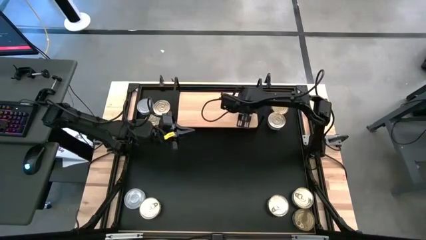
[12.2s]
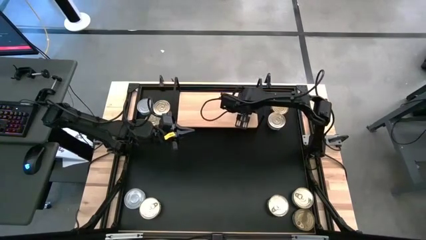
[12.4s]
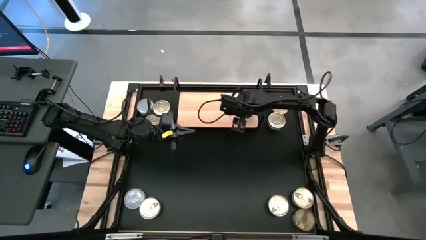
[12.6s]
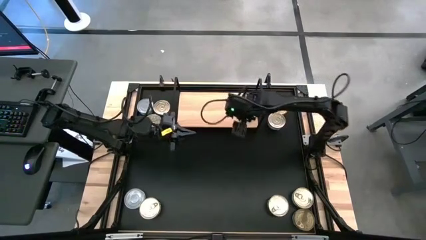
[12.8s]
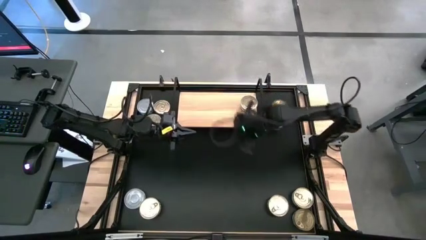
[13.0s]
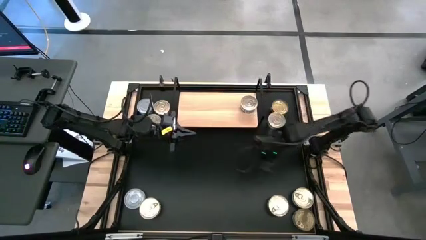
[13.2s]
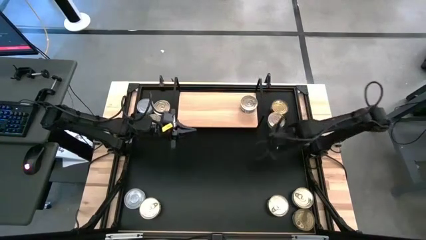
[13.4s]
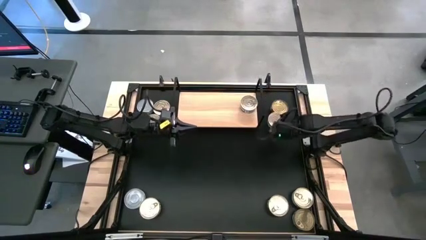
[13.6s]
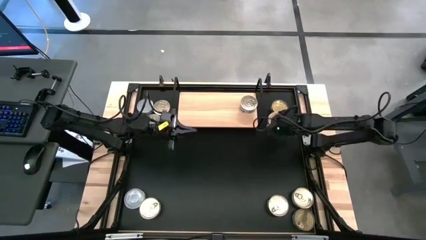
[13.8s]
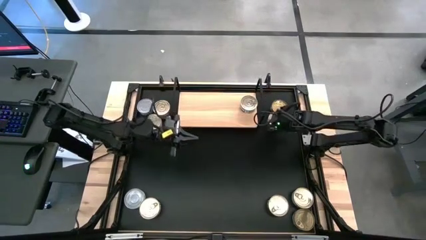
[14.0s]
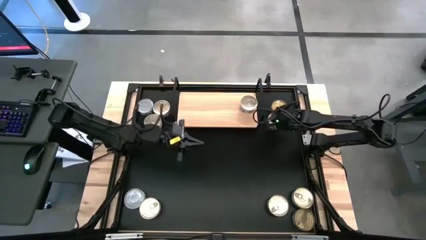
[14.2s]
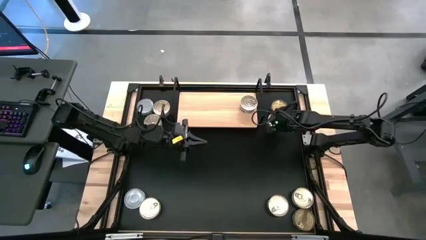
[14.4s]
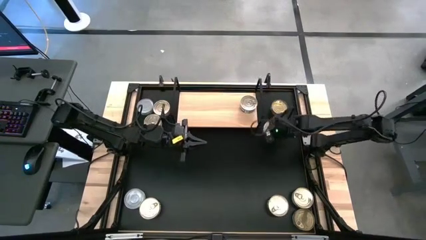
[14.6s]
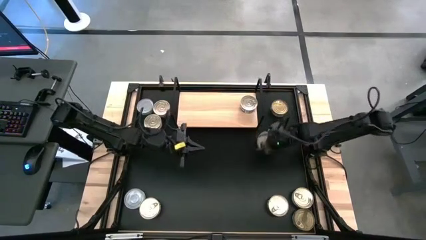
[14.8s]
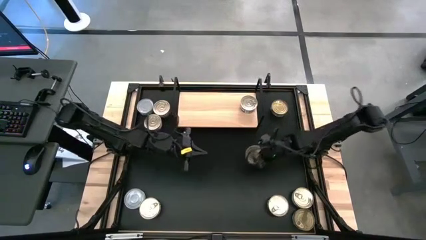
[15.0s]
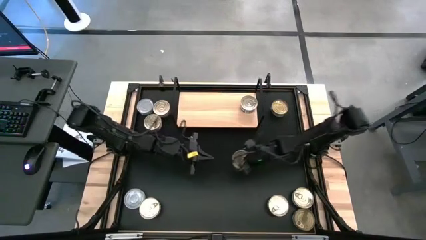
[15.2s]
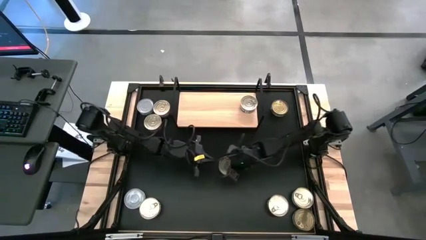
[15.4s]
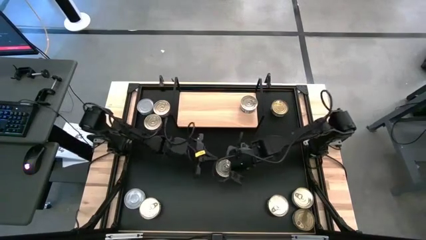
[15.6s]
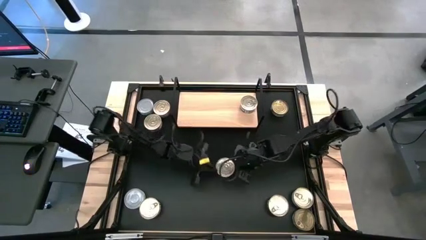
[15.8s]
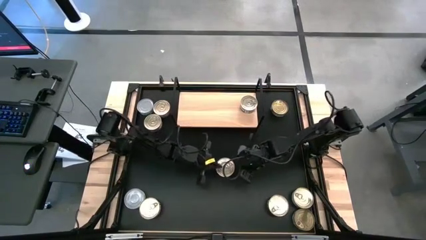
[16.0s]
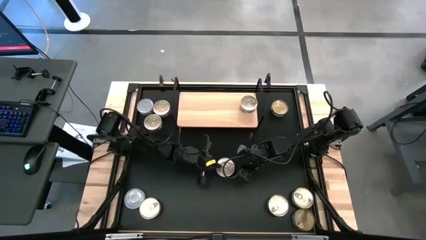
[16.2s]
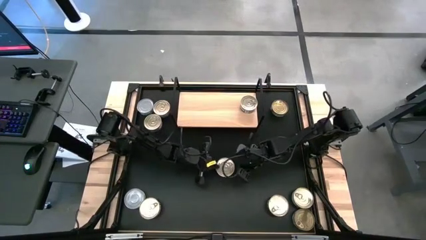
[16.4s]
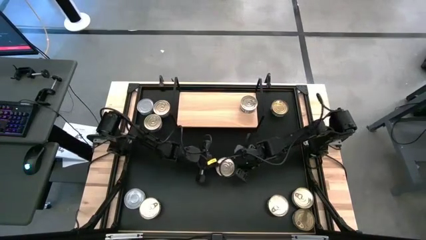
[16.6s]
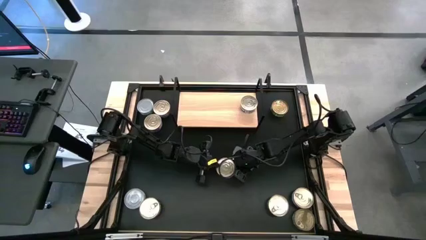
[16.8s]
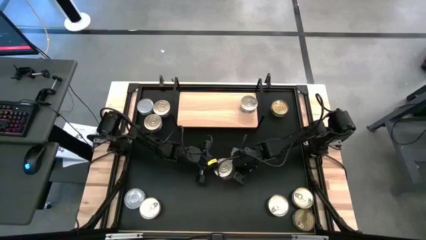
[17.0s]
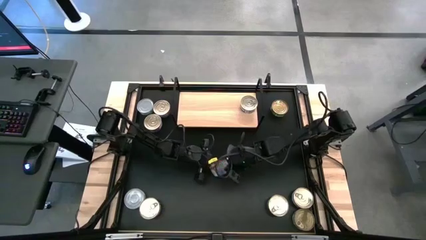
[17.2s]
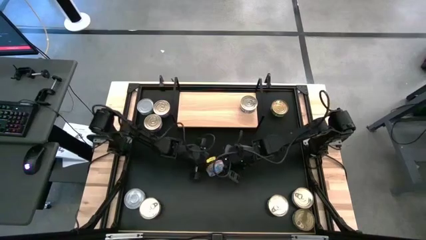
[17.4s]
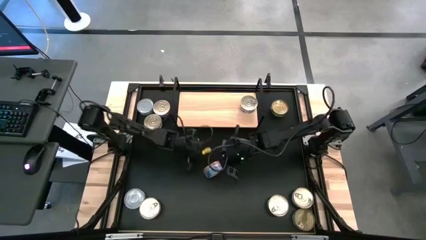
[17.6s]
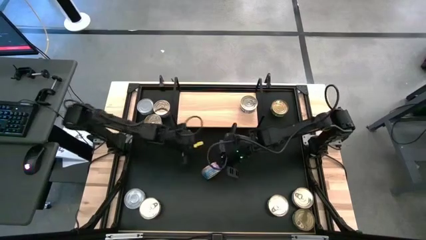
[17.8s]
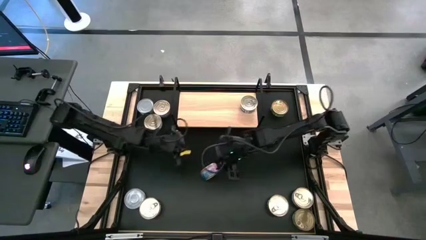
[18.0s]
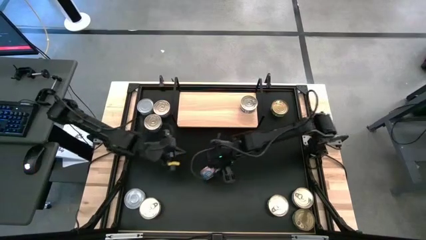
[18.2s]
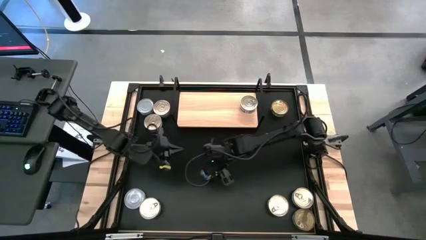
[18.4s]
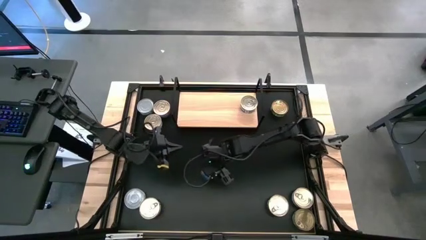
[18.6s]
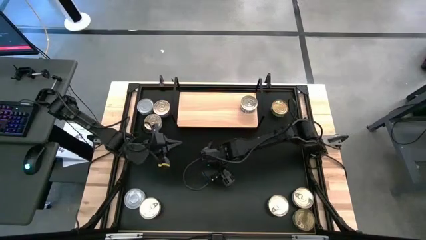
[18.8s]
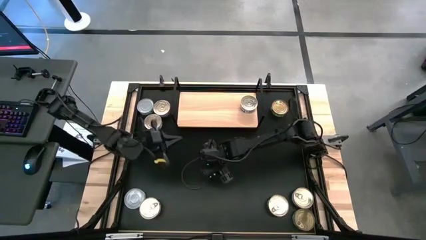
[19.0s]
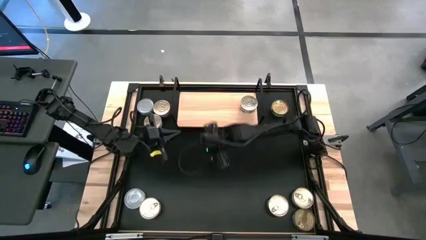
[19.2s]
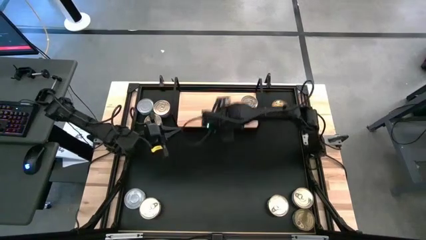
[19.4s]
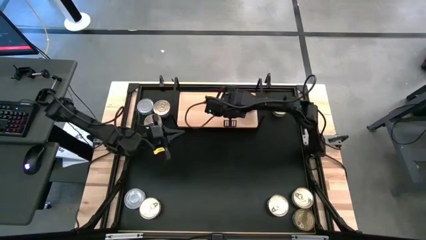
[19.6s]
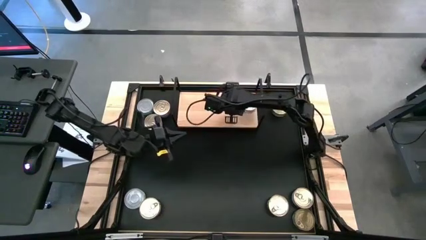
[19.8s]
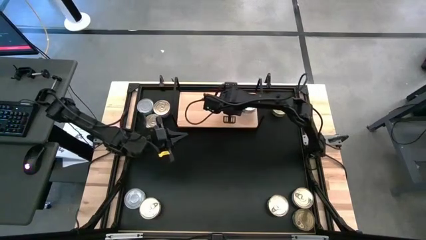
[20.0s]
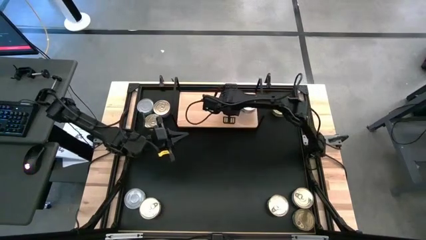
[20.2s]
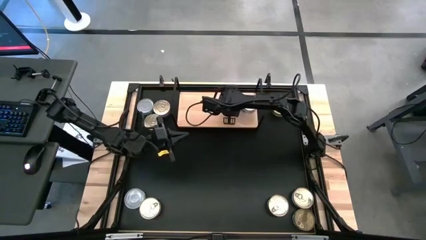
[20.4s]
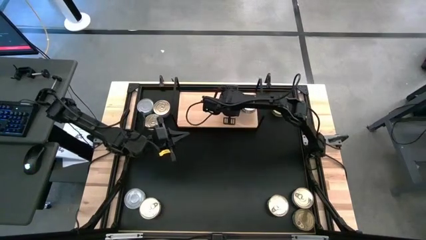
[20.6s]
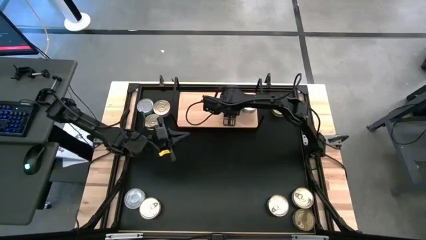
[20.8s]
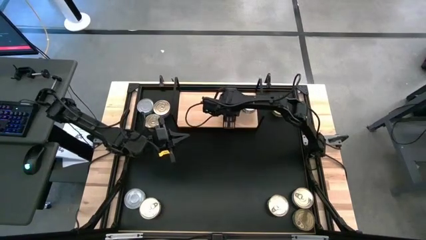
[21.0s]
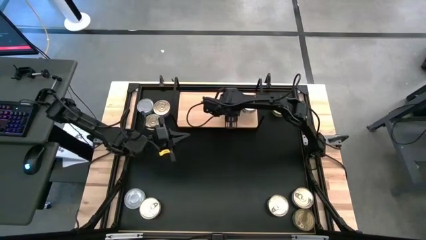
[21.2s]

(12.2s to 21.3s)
Task: Stack canned seafood by type on shelf
Put the blue and pink tuna can on the shelf

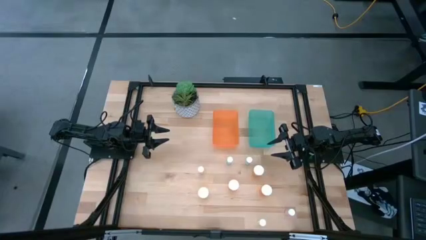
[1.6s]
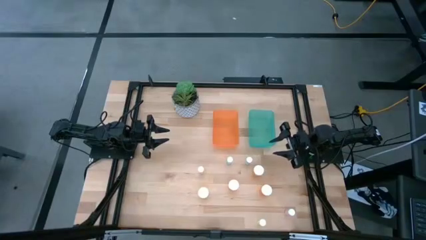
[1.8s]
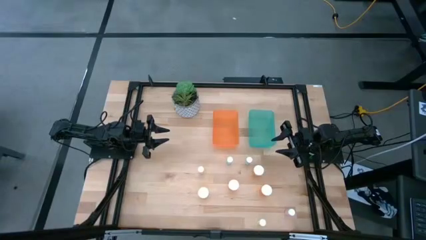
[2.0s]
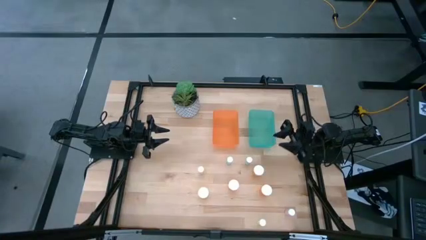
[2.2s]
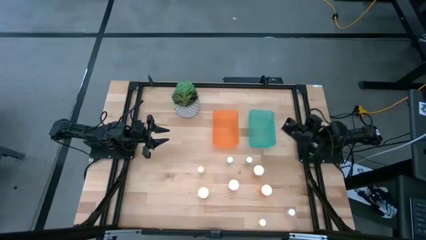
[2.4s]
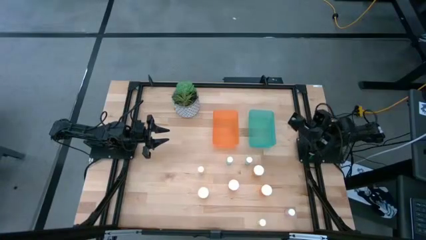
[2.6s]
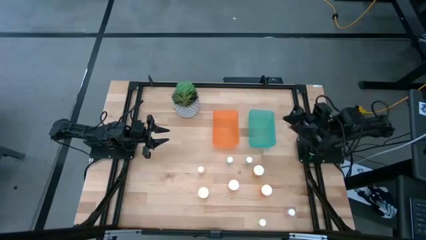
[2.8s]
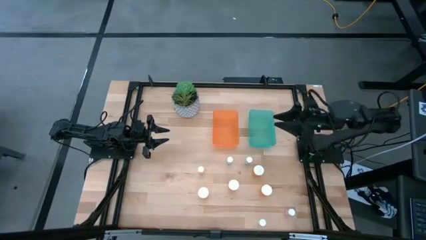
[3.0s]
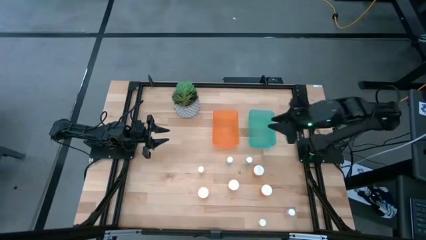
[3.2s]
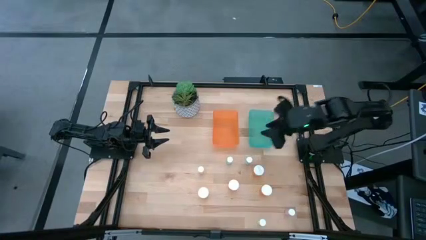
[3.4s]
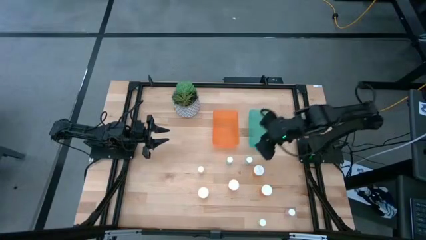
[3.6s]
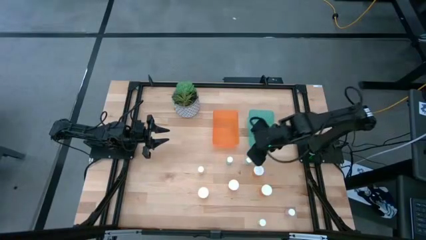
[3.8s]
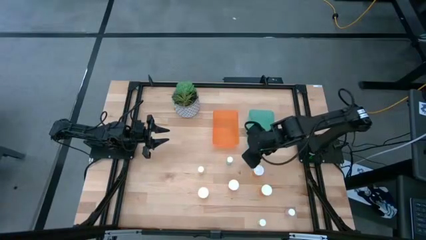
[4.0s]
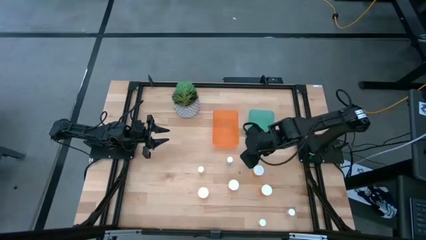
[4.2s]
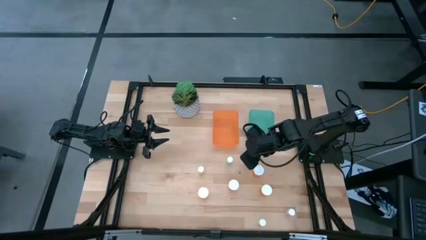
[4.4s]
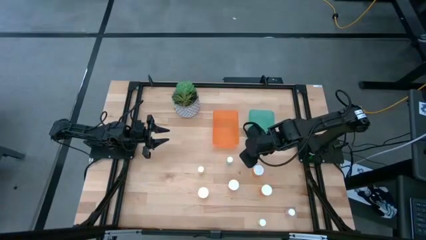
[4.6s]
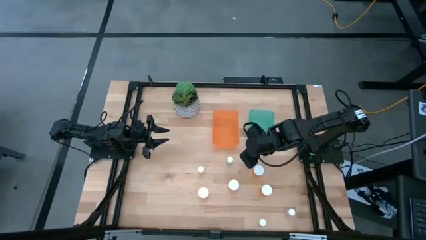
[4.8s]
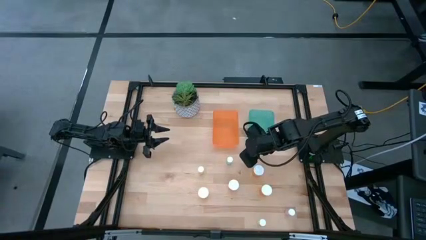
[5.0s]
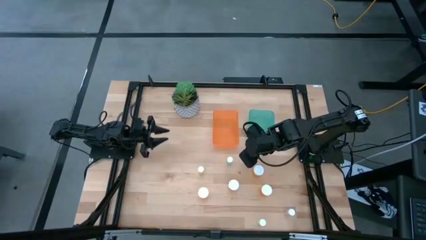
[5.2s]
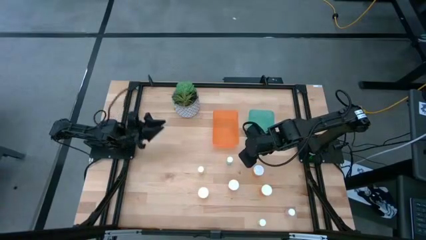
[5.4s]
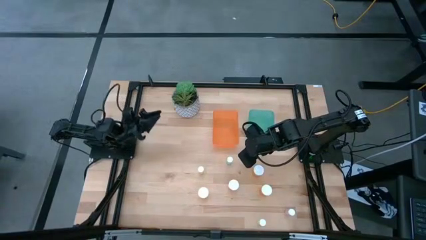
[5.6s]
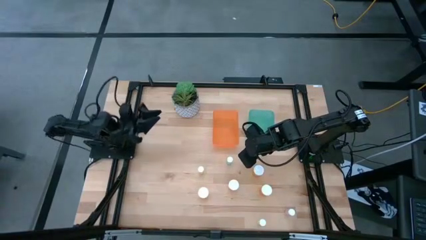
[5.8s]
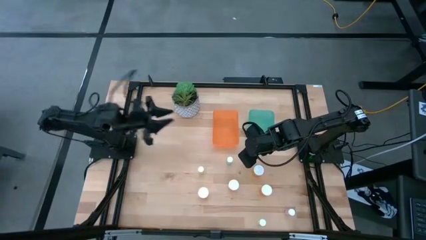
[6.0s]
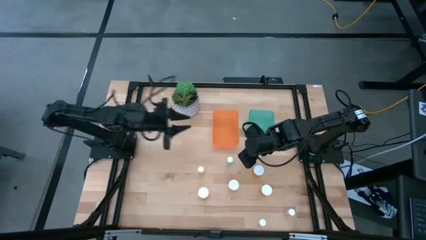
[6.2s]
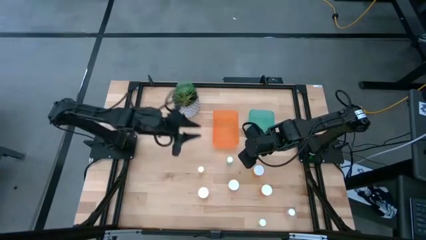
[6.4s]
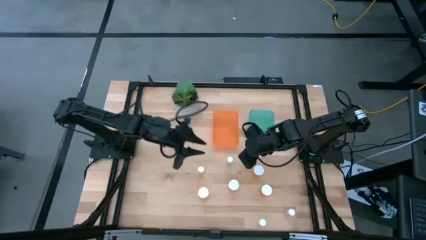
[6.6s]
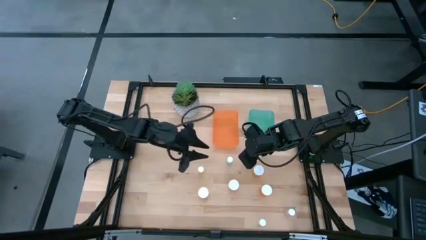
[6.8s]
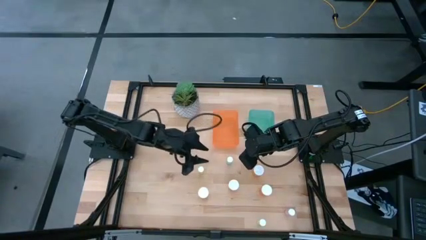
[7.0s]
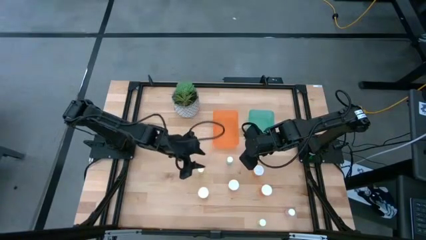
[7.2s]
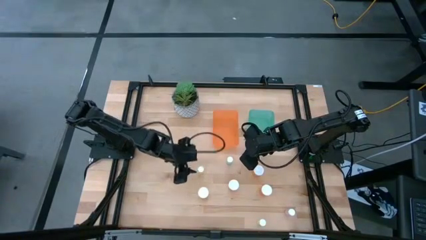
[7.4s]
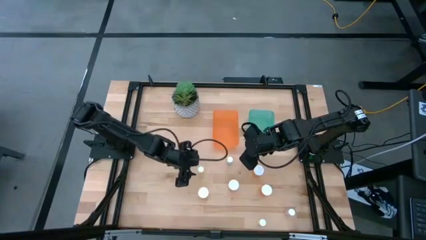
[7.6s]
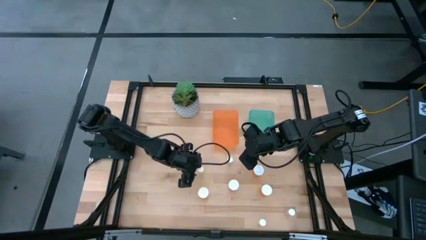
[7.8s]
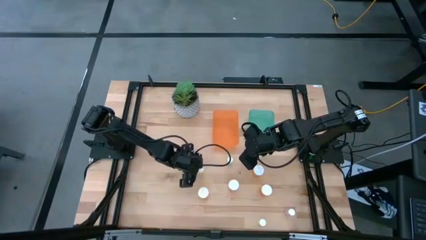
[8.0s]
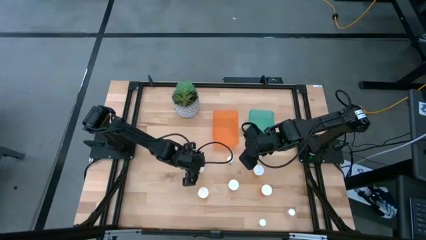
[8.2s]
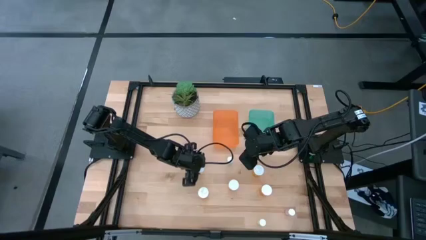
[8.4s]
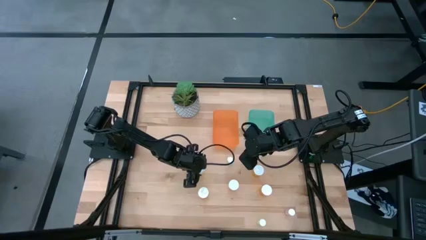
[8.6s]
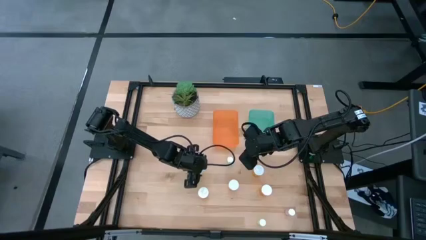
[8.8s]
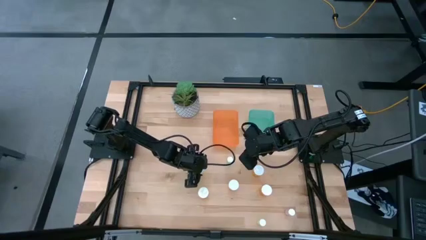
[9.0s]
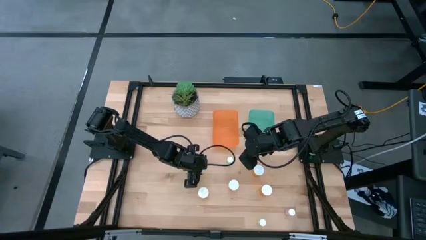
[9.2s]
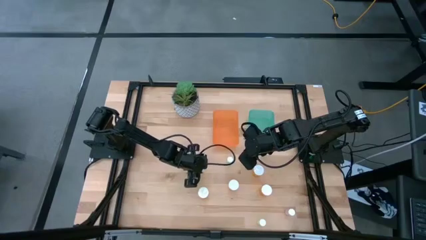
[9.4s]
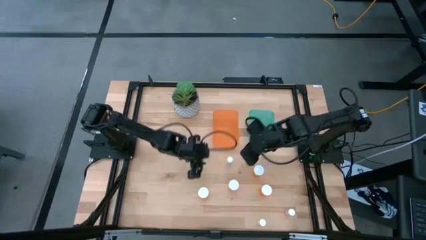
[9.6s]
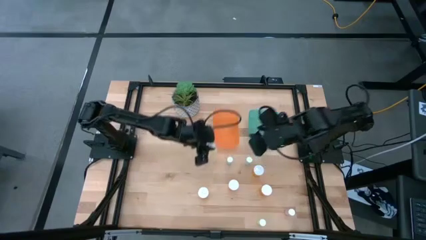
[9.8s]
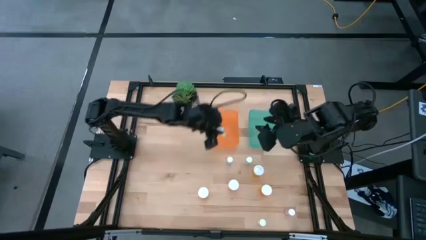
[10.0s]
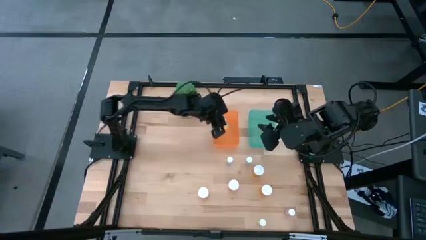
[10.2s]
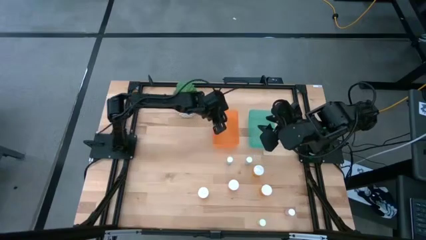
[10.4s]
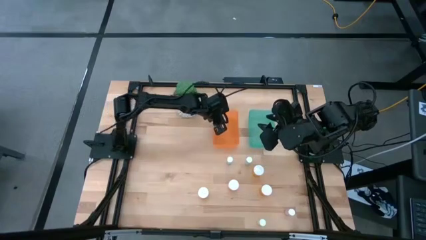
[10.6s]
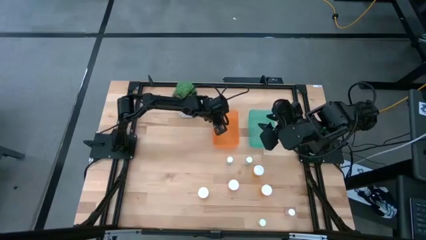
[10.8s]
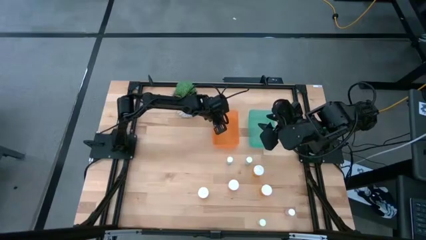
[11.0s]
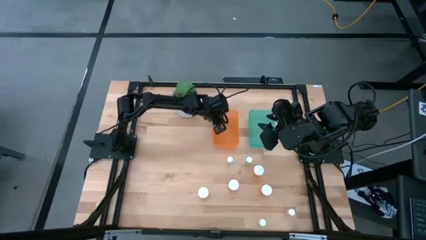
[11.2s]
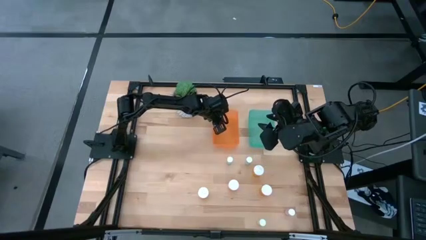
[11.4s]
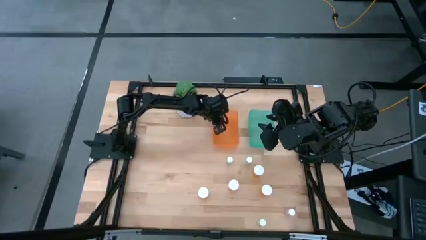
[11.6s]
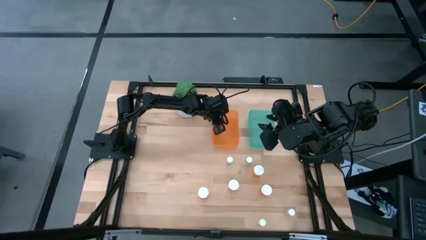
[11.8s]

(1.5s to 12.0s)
Task: Pick and place medicine bottles into bin by pill shape (circle, oval)
Put the top small yellow bottle into the orange bin
